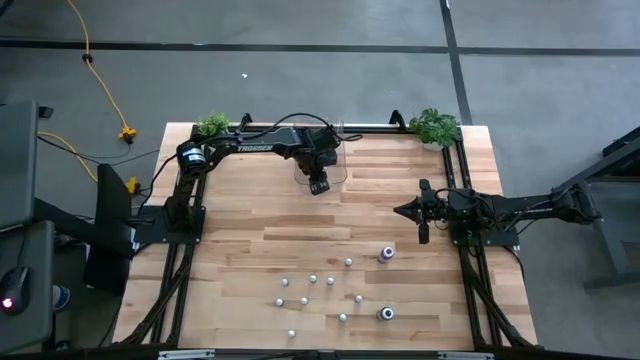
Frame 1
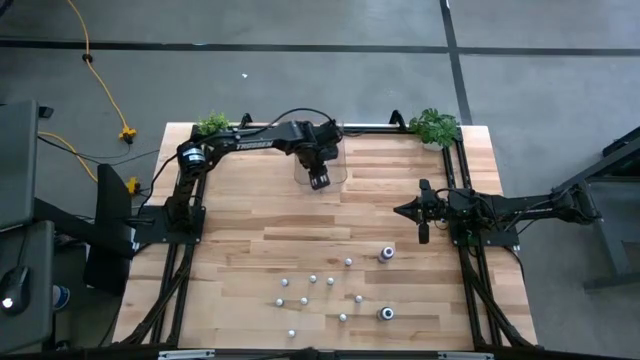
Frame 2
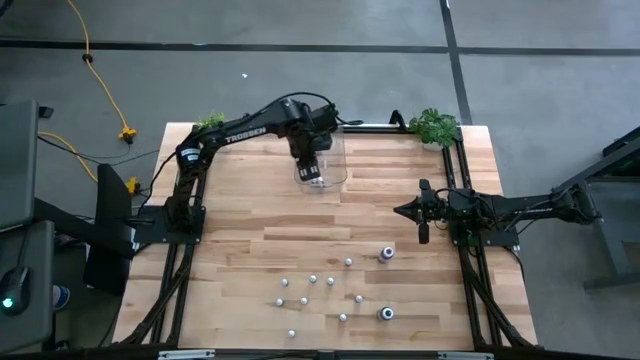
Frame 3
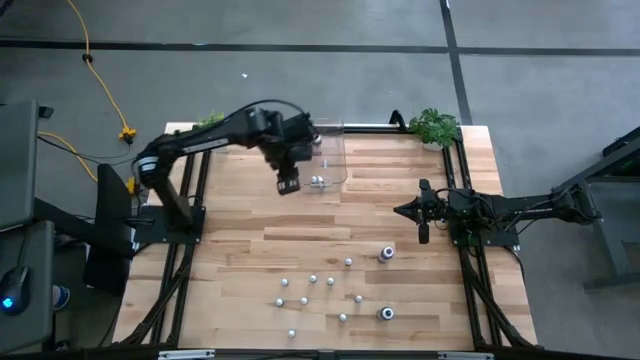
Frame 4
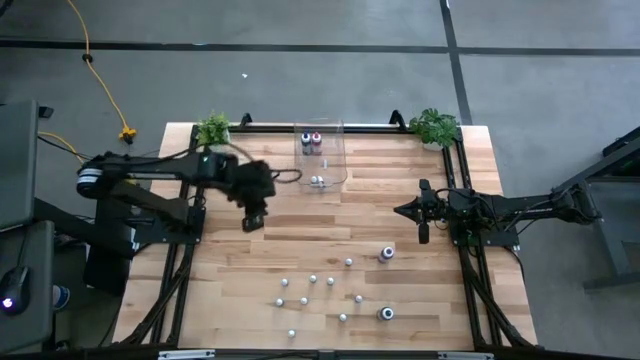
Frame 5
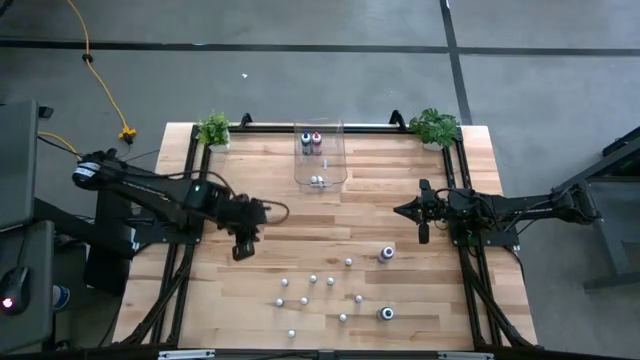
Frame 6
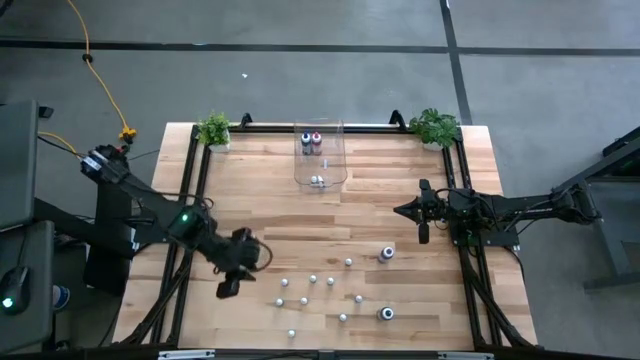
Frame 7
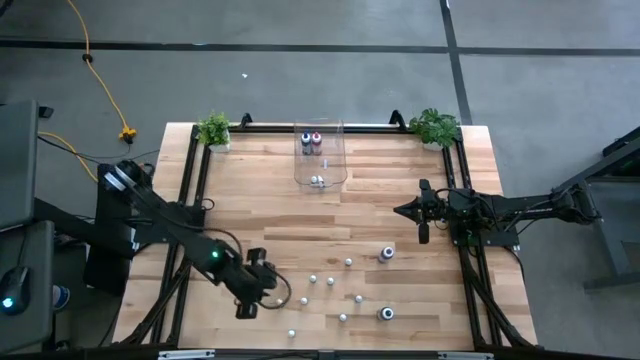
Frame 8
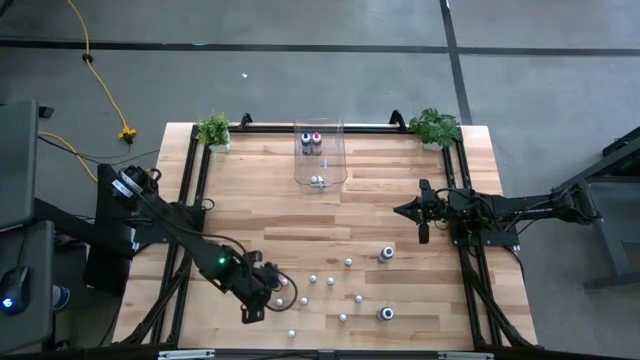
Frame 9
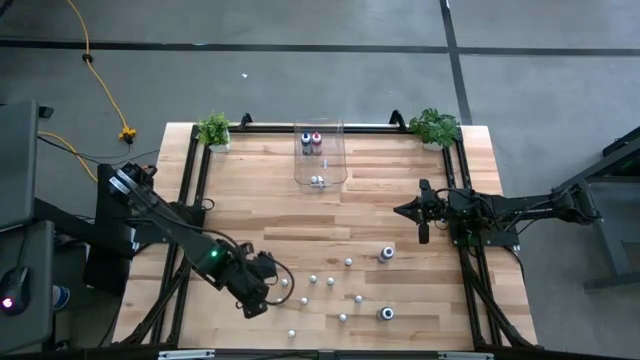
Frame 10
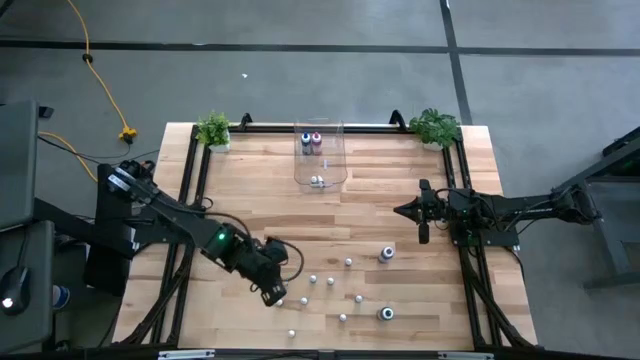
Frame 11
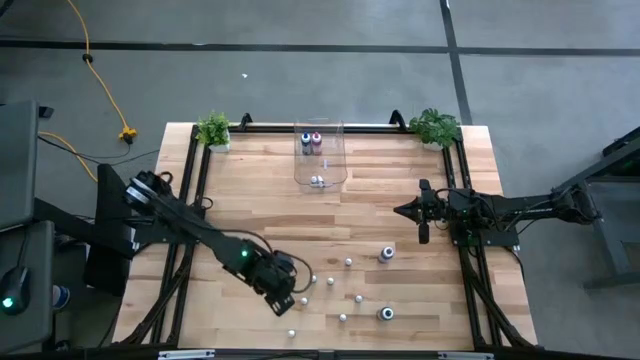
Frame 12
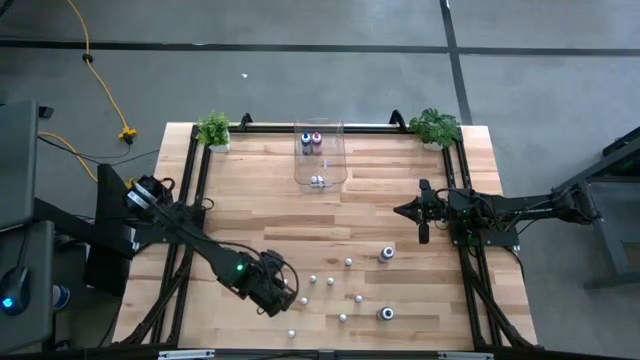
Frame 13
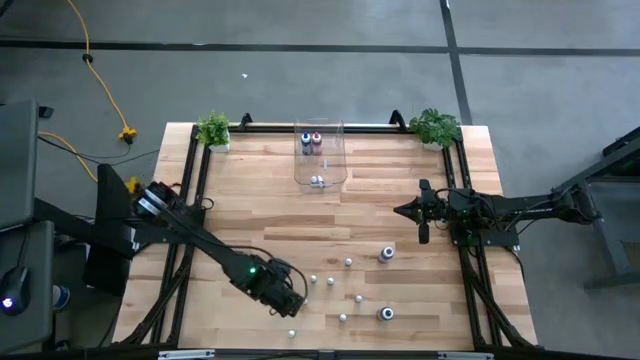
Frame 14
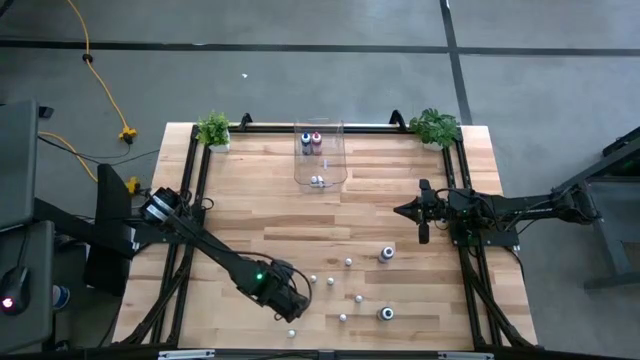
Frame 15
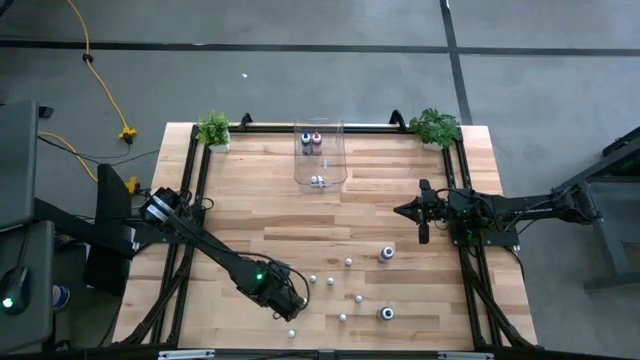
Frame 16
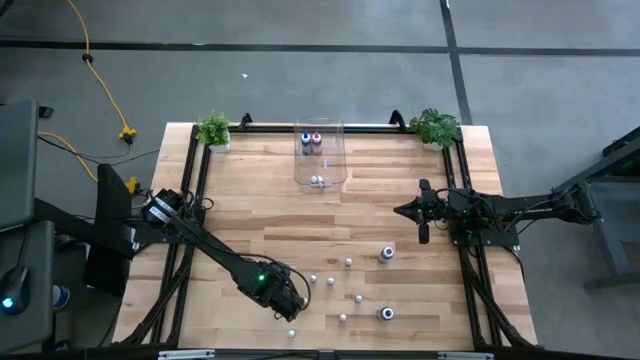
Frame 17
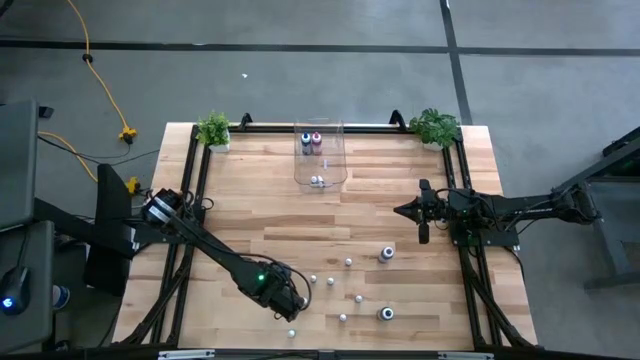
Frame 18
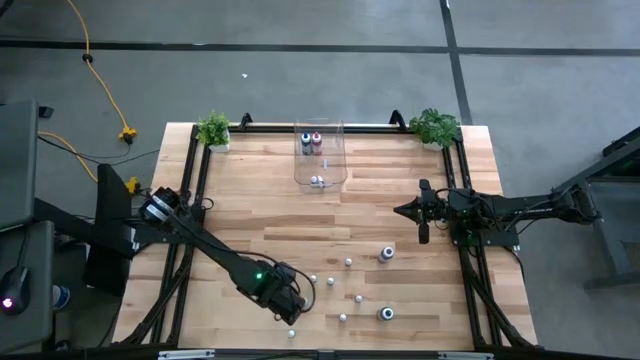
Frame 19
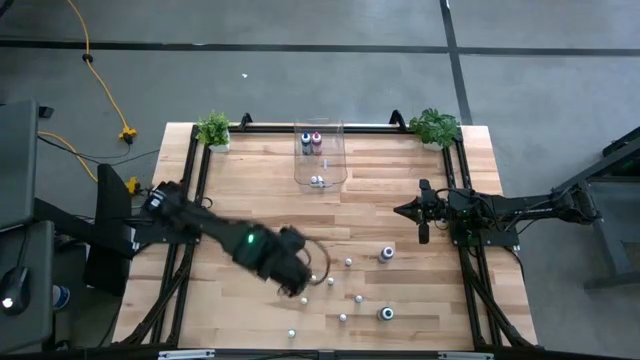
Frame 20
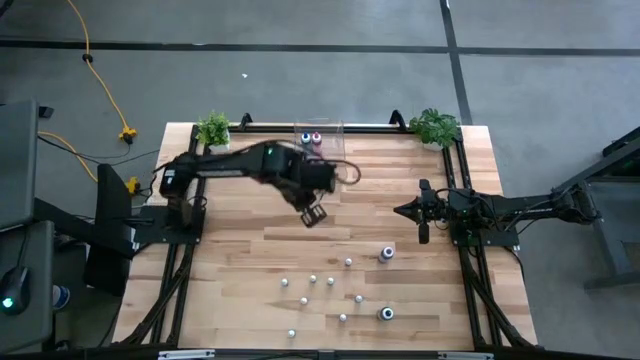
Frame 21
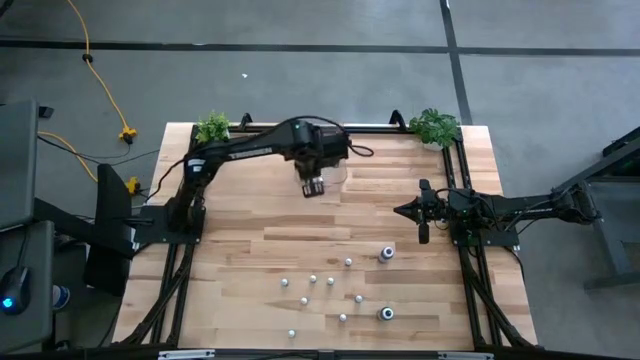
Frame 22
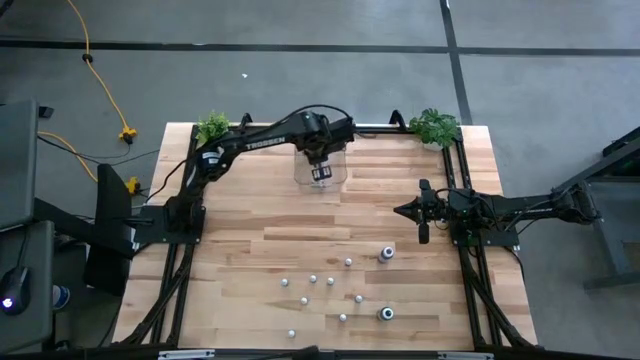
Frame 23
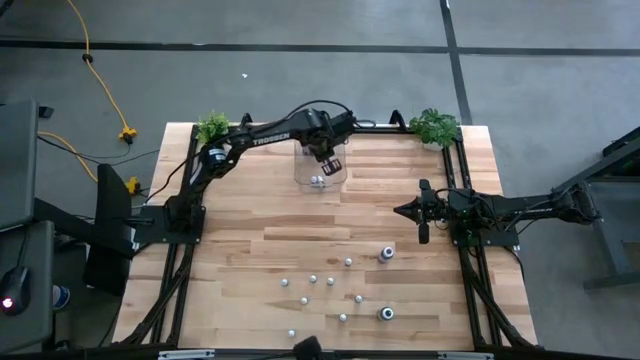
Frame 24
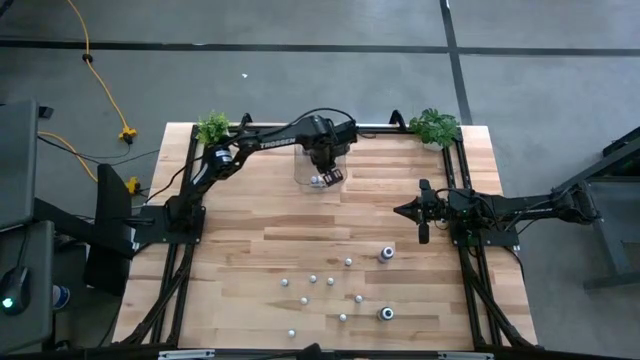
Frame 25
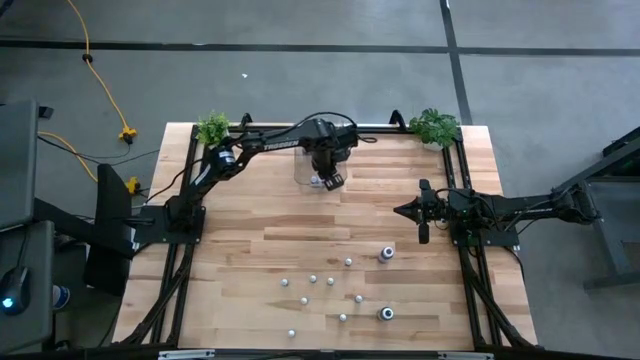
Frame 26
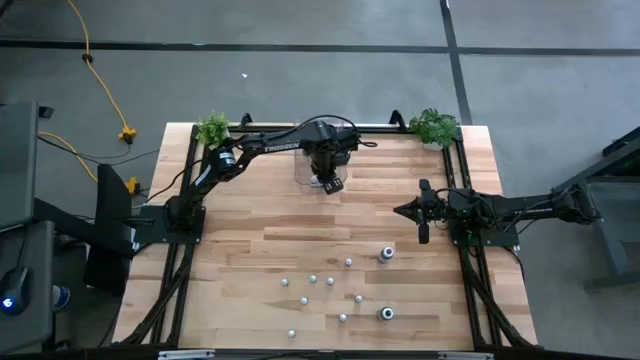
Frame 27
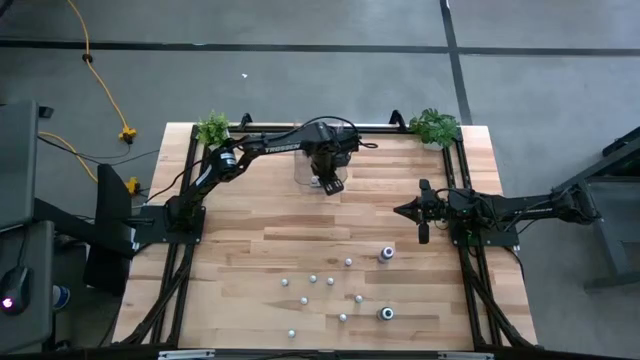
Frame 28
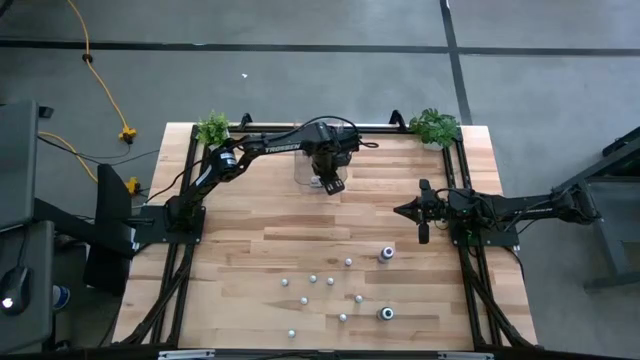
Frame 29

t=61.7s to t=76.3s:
Task: Pick & Place food coloring
Put the small purple food coloring into the transparent bin

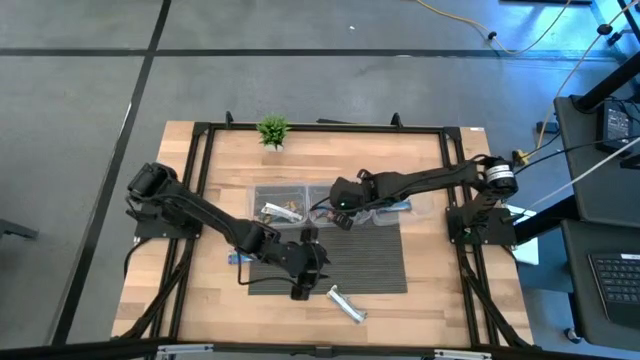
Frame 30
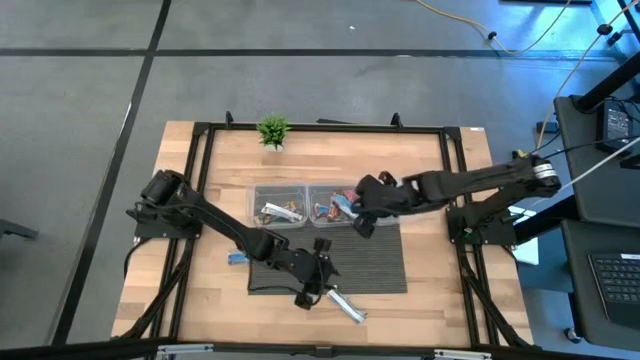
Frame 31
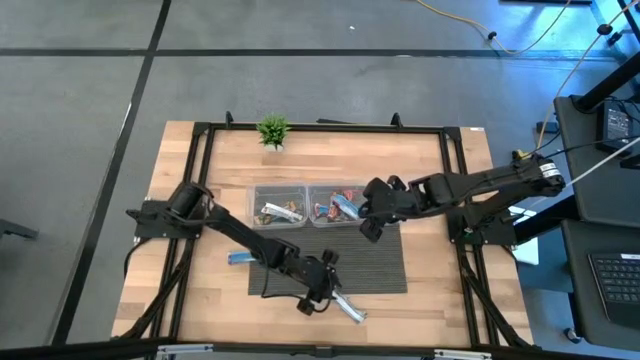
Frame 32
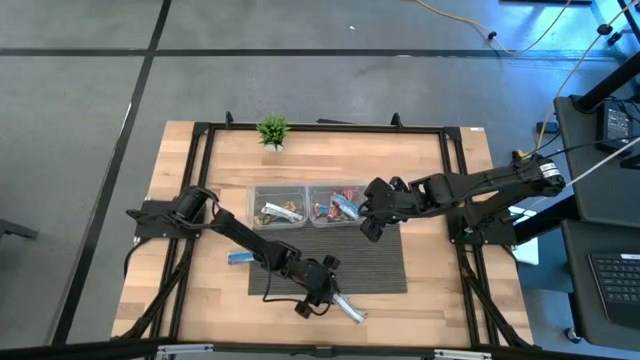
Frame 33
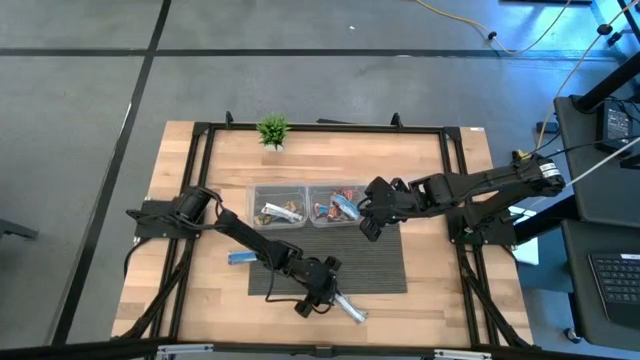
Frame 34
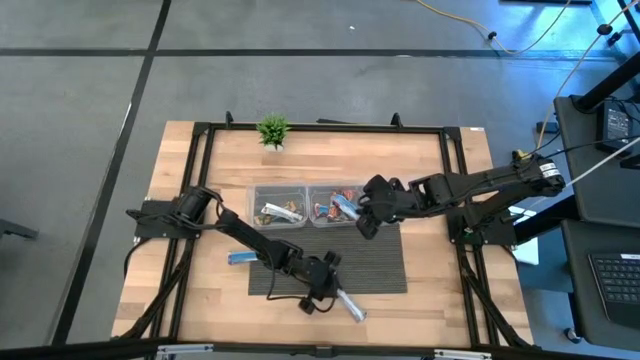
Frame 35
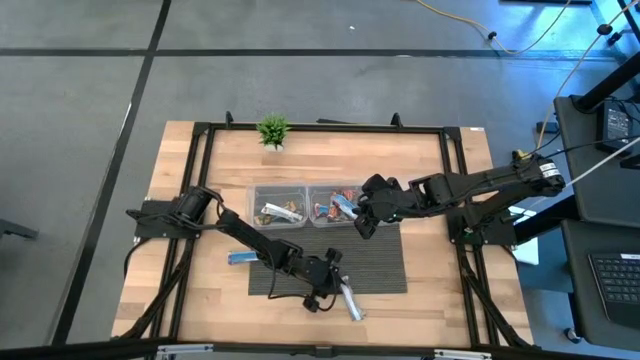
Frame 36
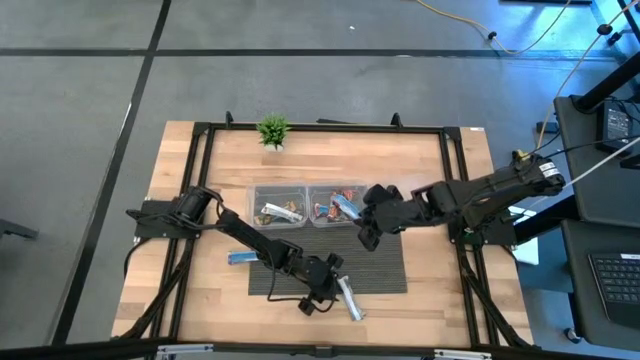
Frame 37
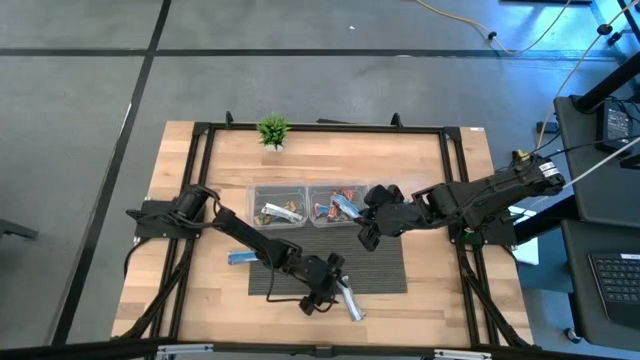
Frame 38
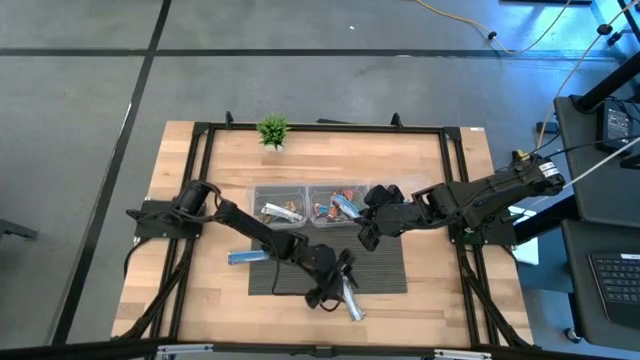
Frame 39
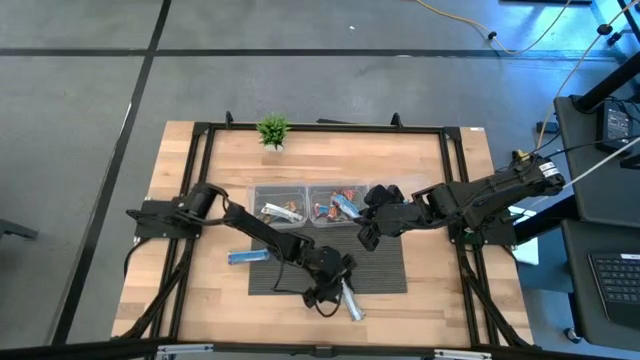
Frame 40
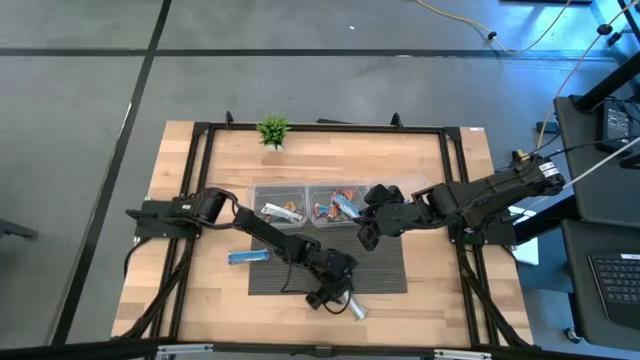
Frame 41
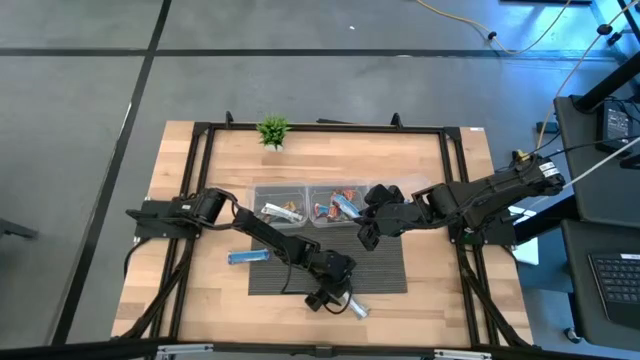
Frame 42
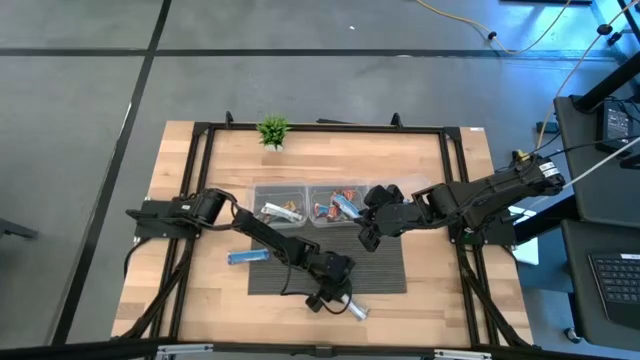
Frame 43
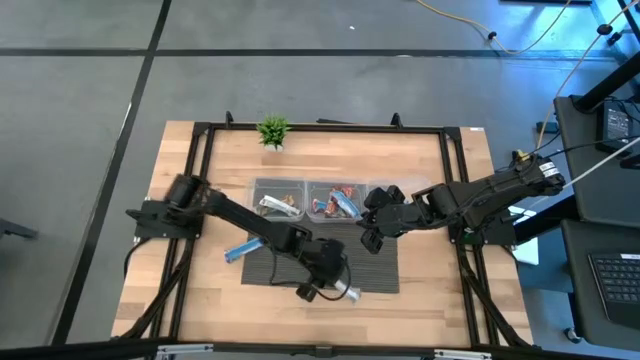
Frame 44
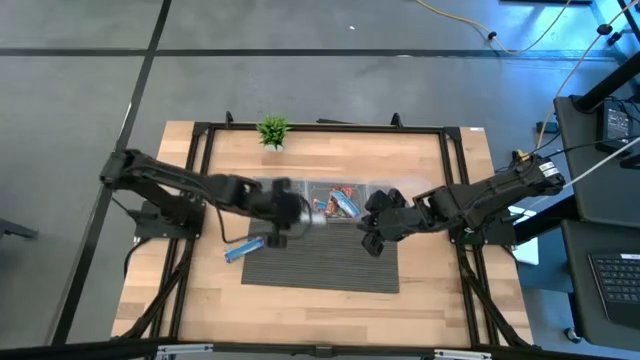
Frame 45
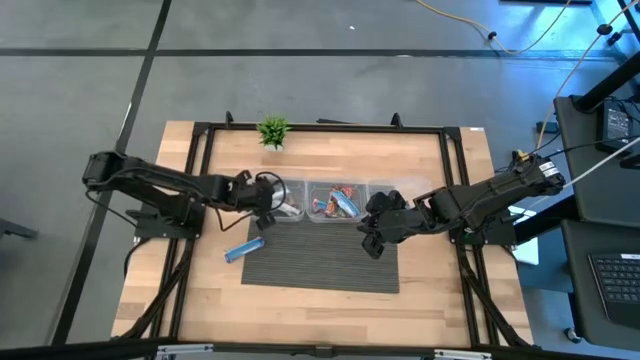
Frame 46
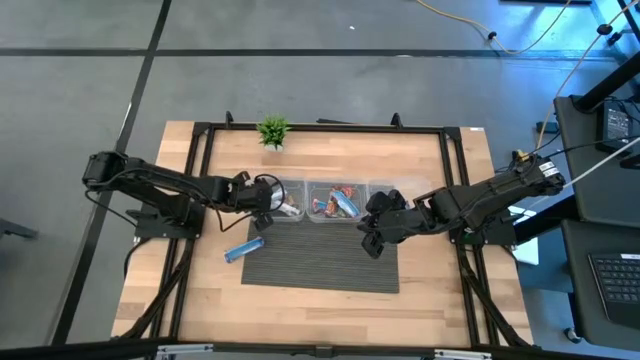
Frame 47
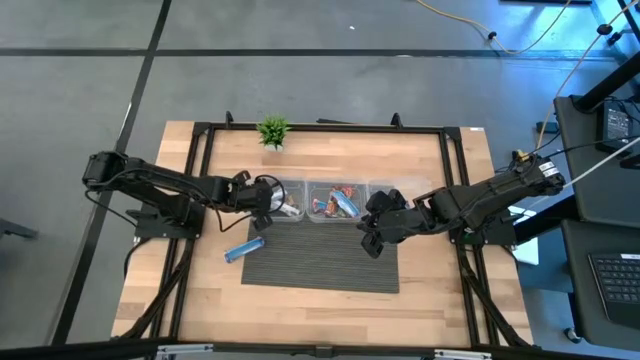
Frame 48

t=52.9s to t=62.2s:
Task: Pick and place Granola Bars by type
Put the yellow granola bar into the left transparent bin
